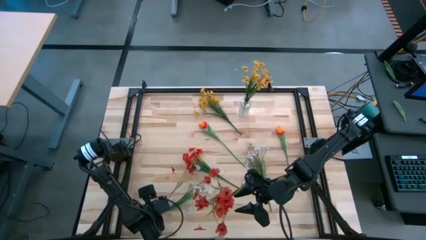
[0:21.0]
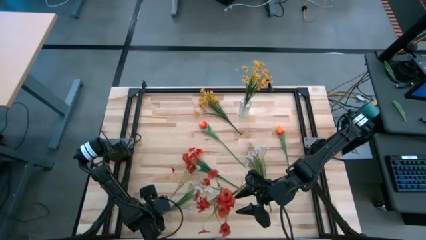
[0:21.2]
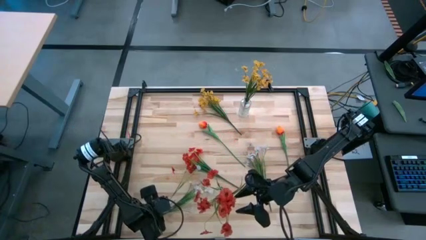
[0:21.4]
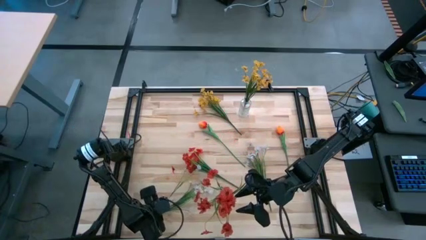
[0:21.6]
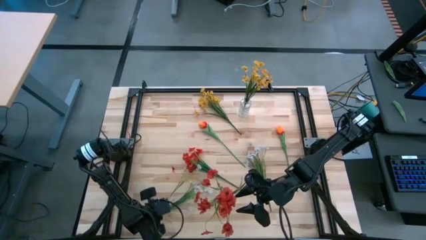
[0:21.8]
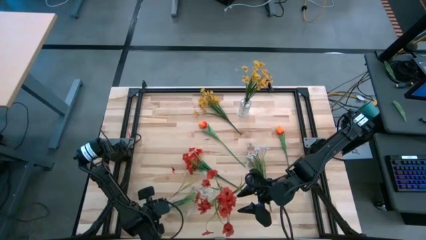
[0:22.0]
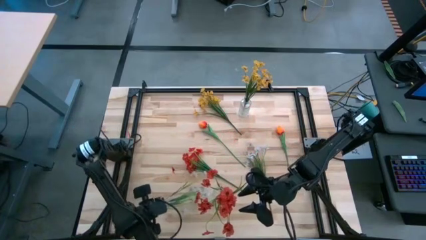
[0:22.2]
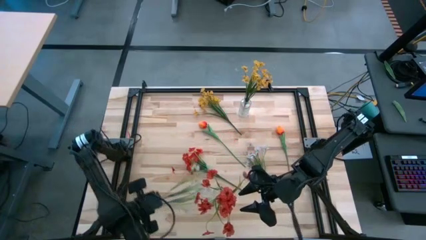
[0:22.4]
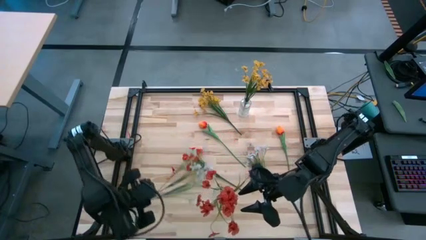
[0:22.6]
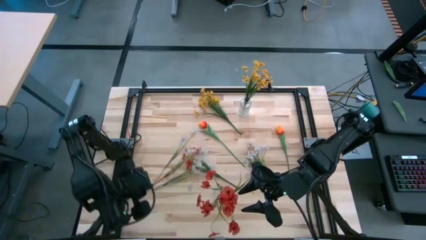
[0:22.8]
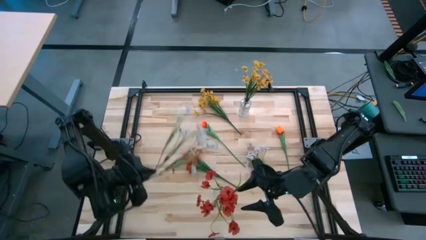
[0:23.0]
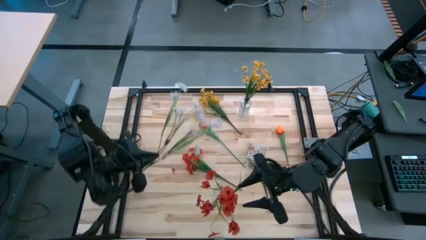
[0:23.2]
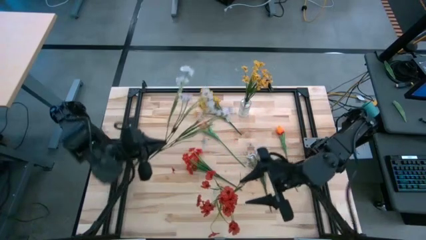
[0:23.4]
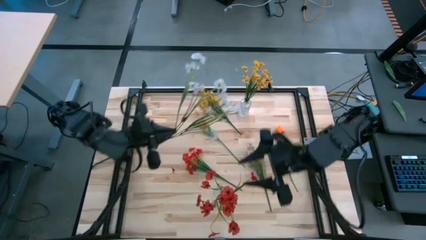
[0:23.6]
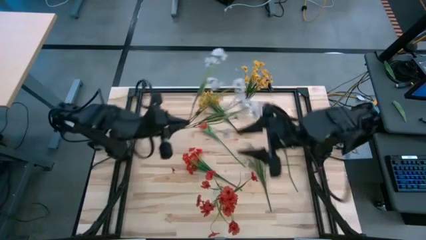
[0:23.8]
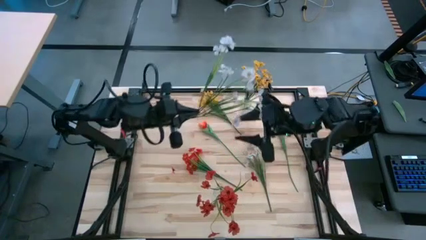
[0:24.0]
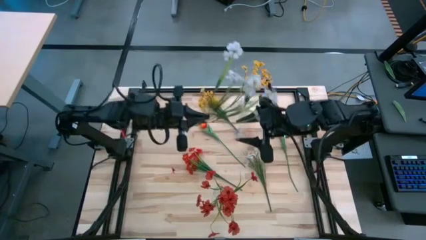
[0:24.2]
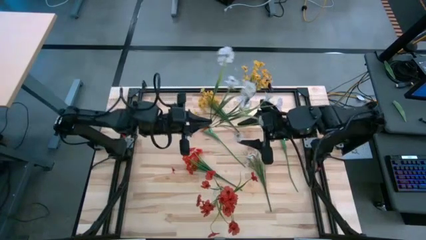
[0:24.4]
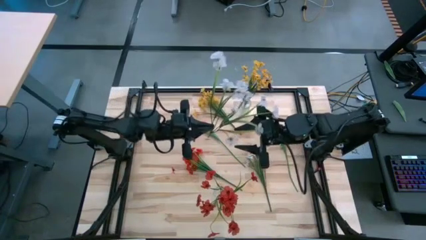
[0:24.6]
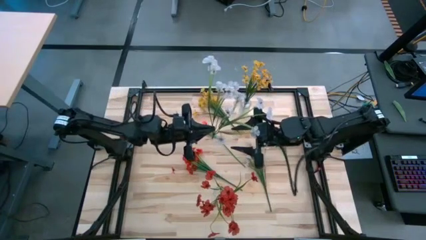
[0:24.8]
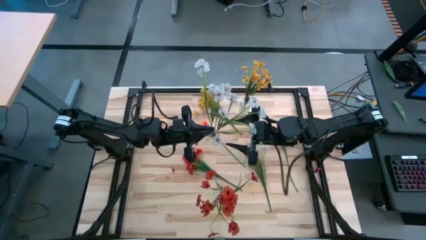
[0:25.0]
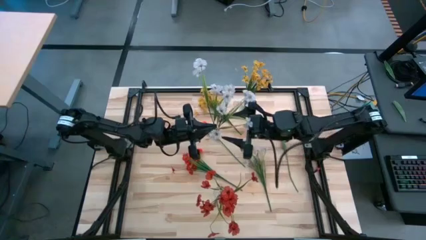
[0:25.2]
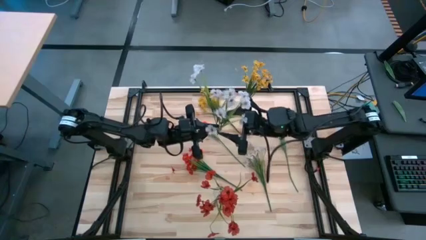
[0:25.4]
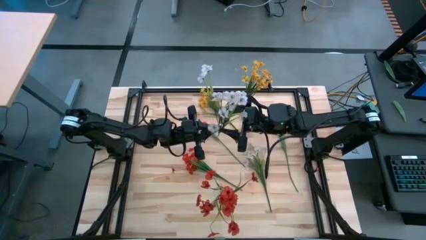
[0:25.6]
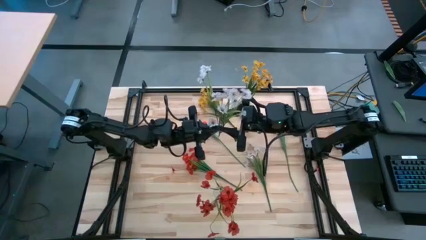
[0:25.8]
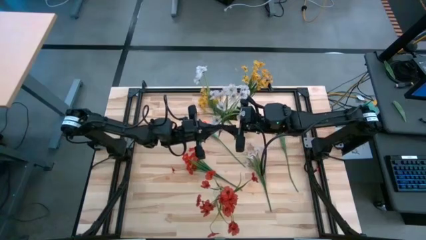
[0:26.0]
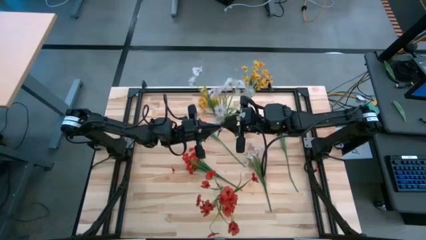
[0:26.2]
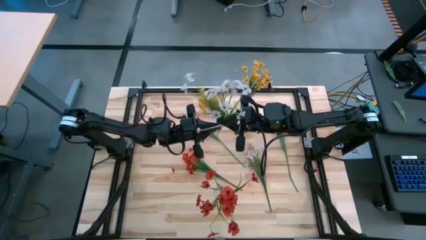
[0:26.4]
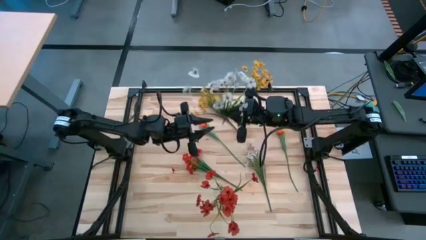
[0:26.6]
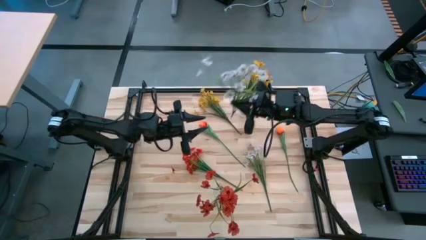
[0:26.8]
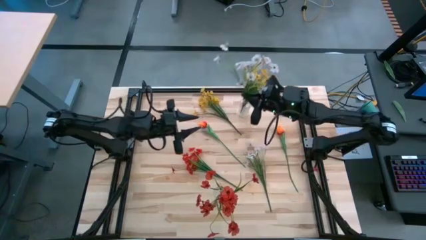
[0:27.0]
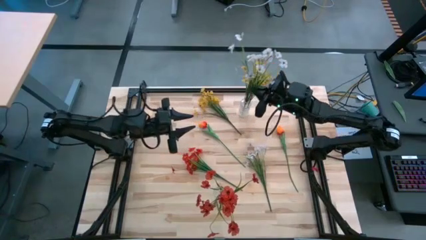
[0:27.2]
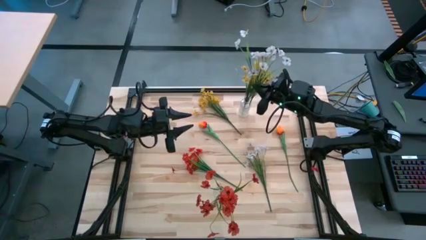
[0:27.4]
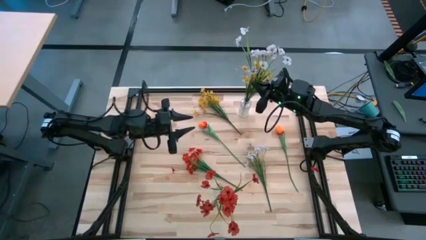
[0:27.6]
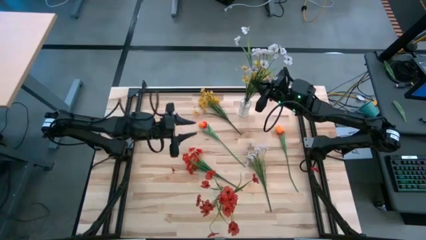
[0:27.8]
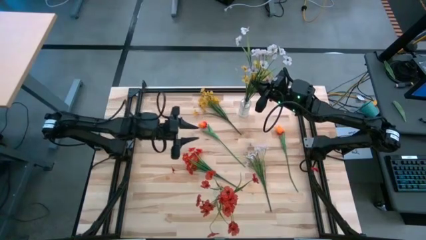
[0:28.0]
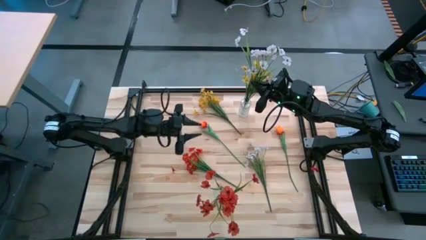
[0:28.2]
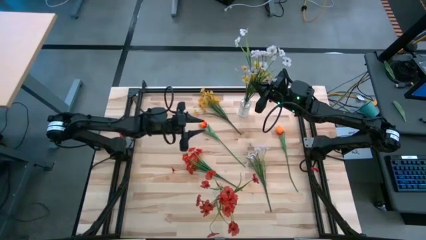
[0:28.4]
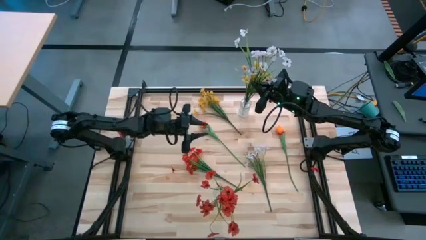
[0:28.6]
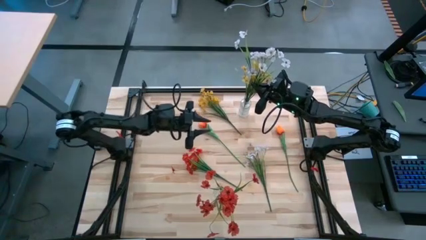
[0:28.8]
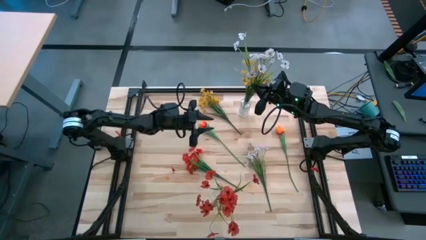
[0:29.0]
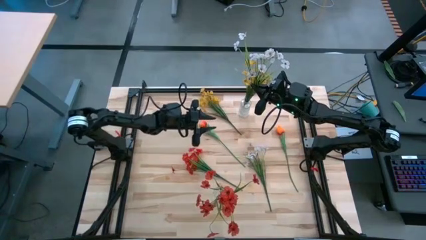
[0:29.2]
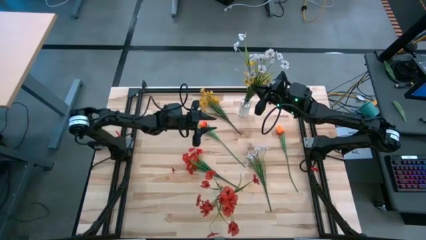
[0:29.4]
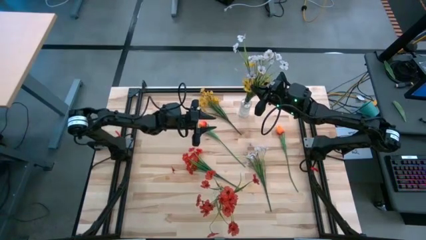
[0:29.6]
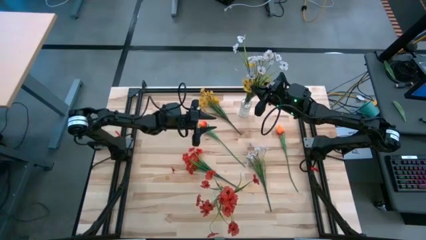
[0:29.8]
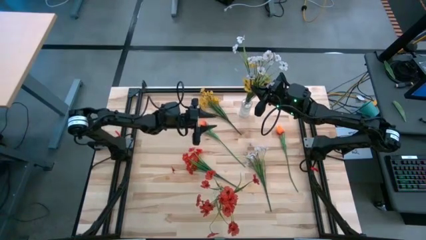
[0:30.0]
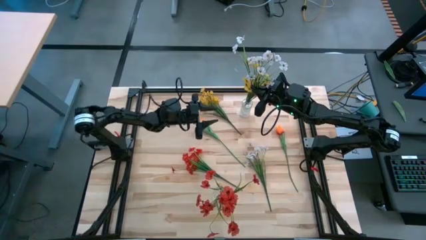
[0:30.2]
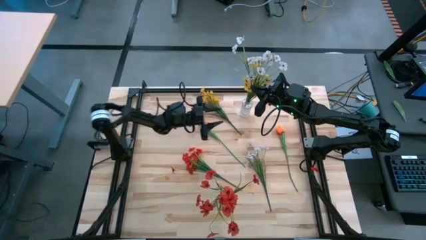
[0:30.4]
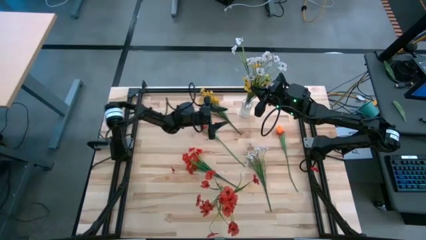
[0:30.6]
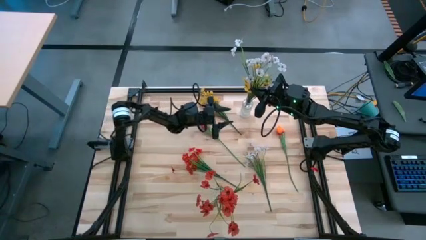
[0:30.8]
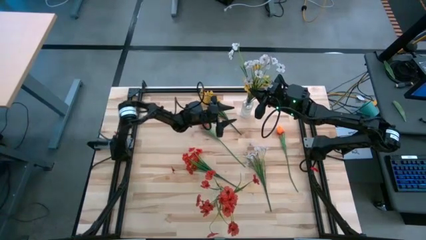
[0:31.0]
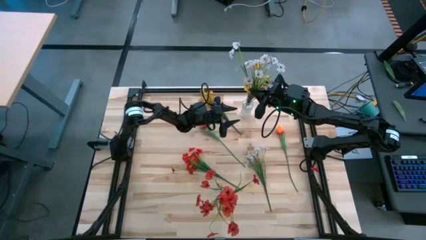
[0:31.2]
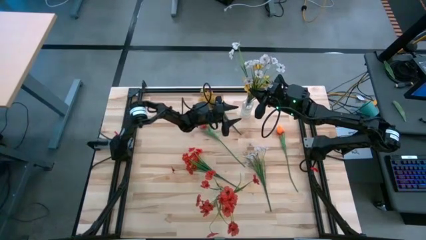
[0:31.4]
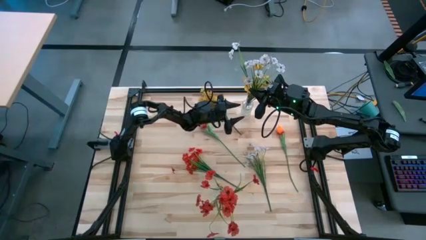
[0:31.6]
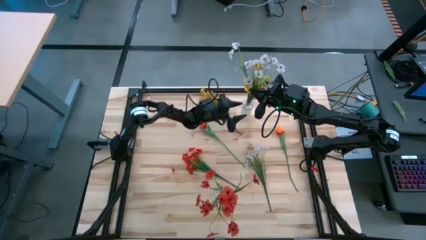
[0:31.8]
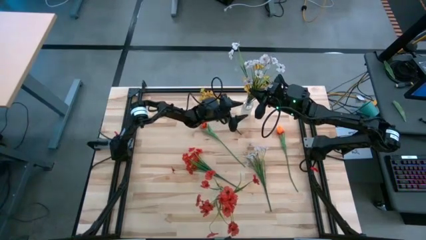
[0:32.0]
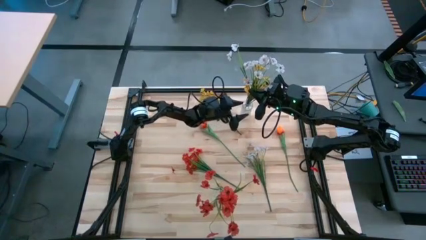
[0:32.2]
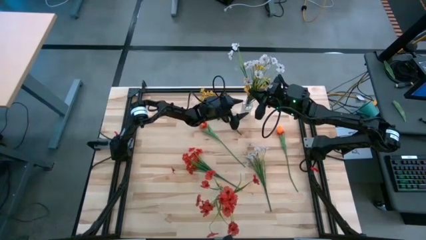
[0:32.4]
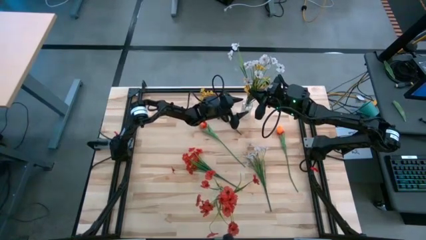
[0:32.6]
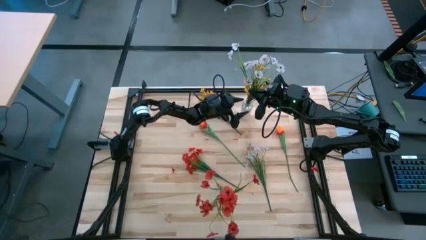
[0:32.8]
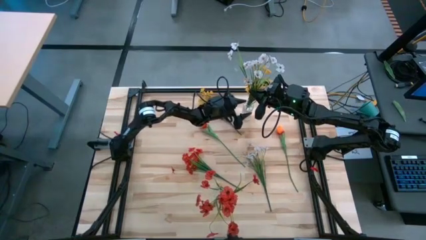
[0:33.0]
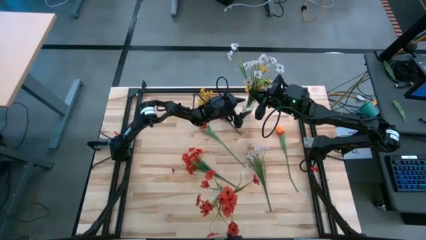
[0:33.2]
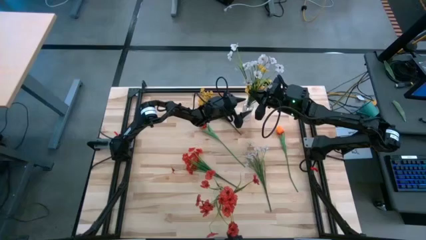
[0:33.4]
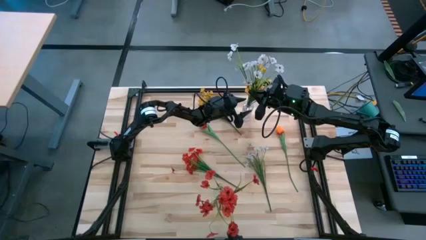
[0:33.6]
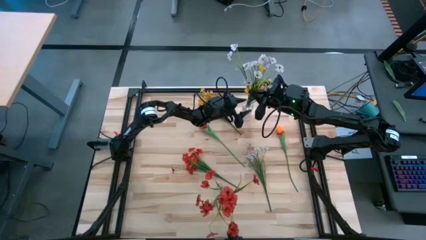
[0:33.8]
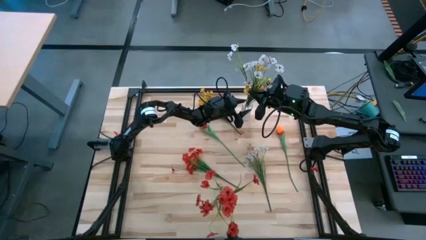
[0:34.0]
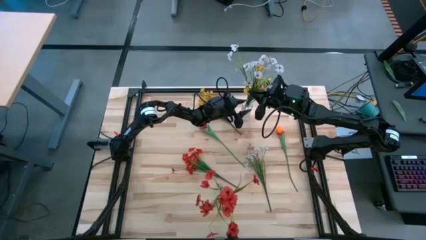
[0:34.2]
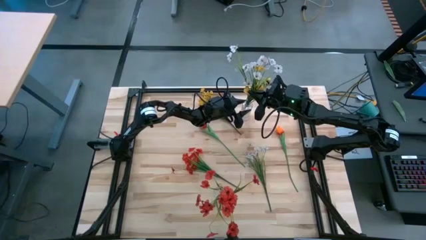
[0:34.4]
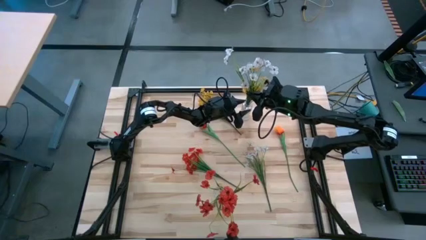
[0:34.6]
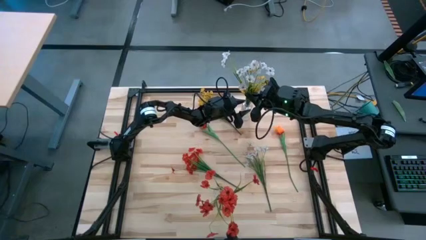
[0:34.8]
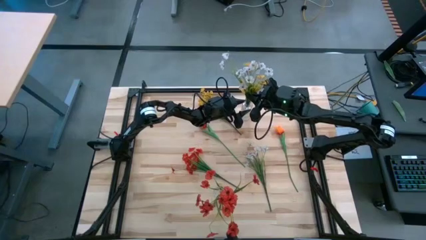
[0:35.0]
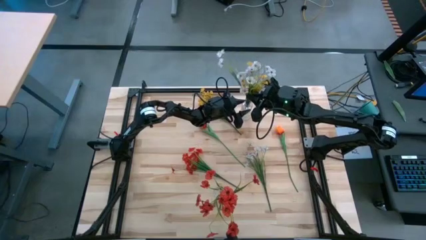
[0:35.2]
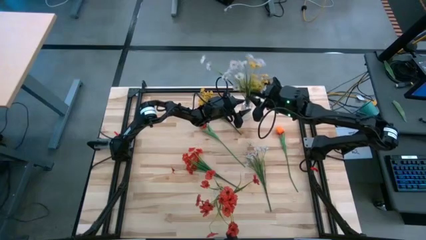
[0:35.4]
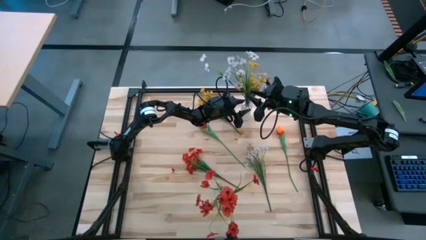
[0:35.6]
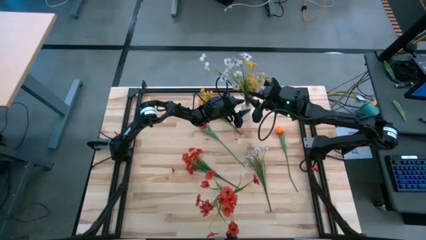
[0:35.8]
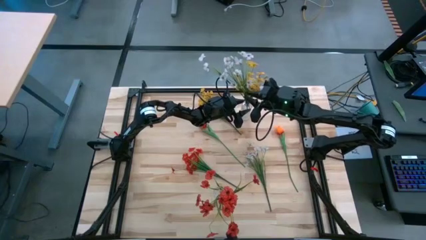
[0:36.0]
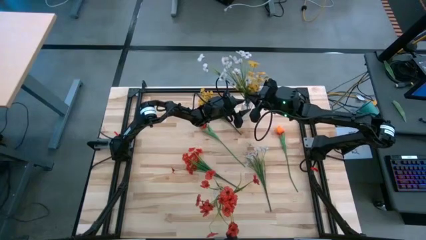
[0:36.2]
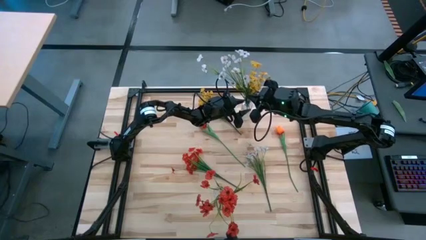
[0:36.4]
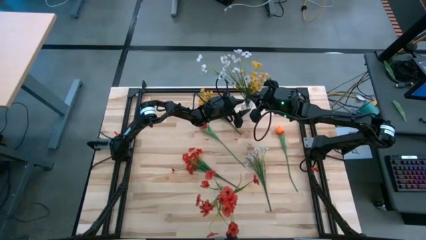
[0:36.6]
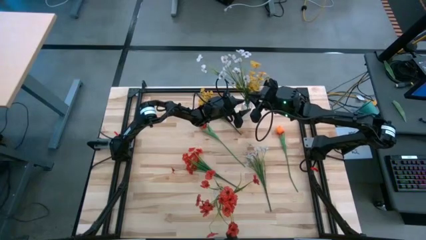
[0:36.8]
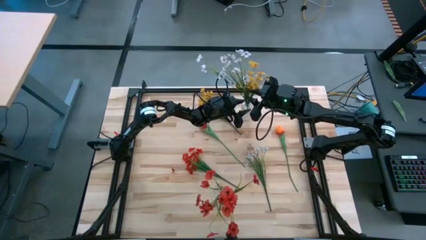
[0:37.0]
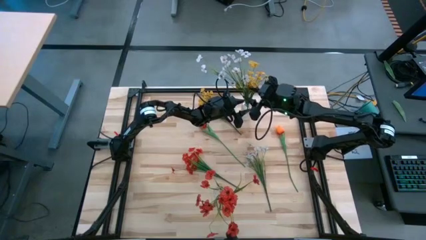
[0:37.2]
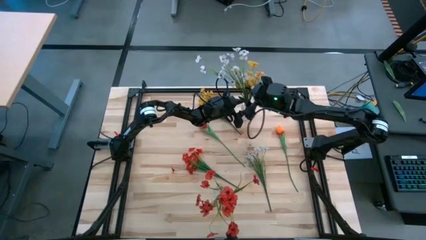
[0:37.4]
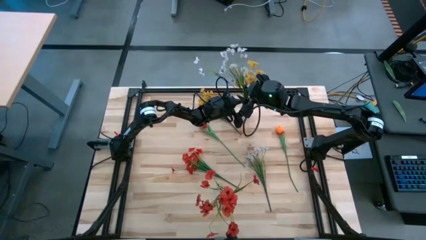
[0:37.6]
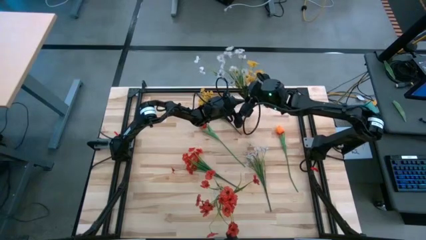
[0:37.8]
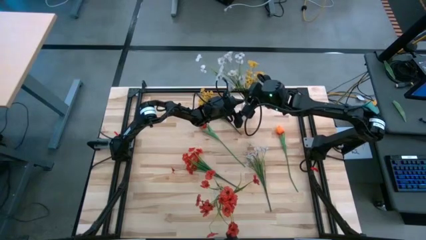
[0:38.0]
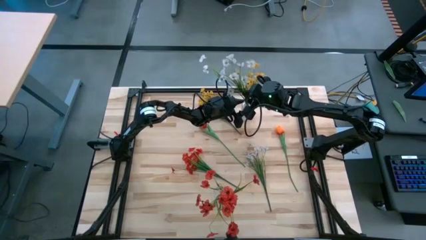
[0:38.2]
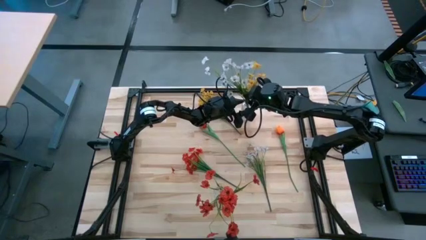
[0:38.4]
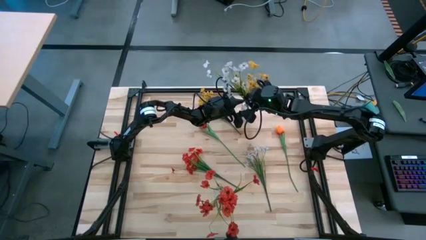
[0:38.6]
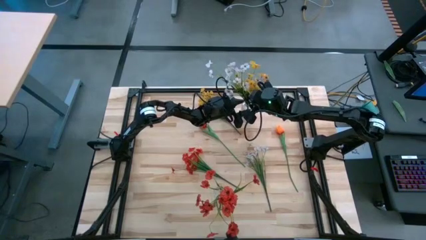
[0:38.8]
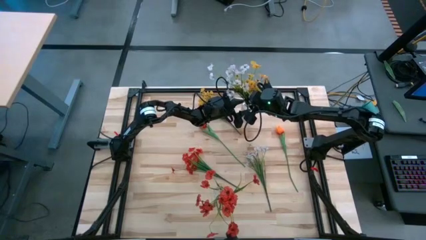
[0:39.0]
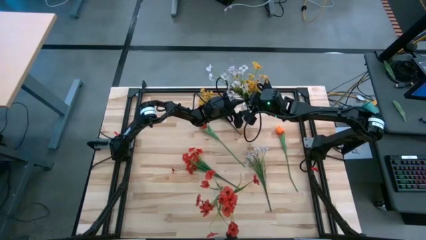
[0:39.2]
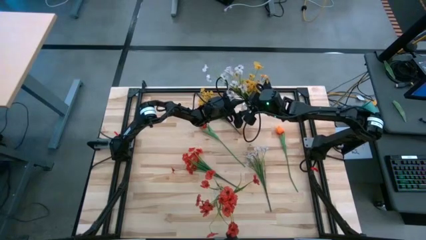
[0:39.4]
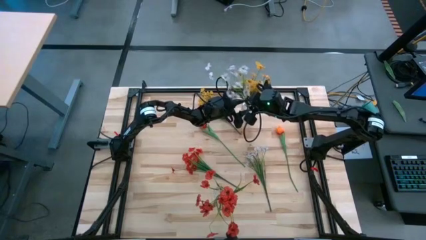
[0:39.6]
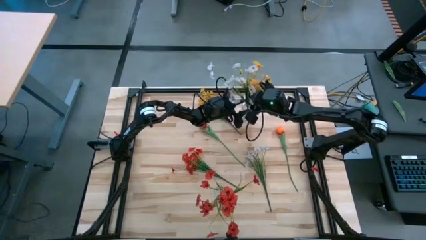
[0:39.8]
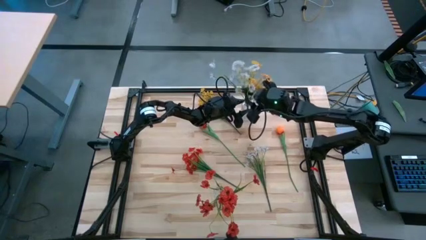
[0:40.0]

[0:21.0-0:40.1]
Task: Sort flowers into vase by color
Put the left white flowers into the top transparent vase
